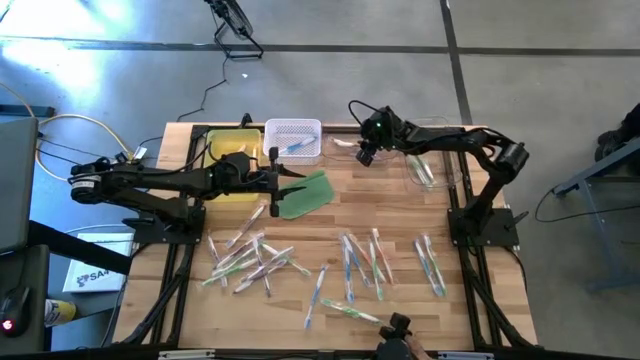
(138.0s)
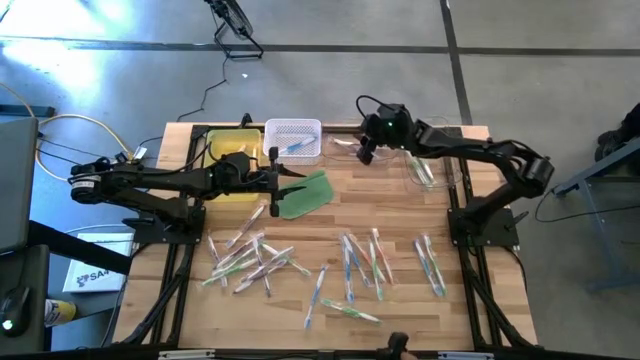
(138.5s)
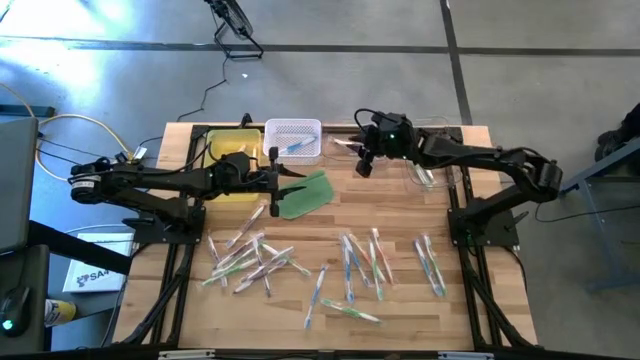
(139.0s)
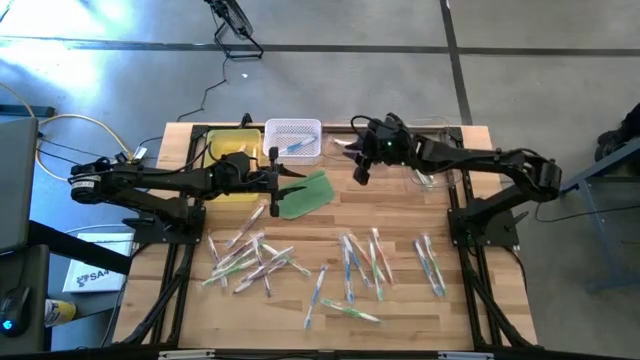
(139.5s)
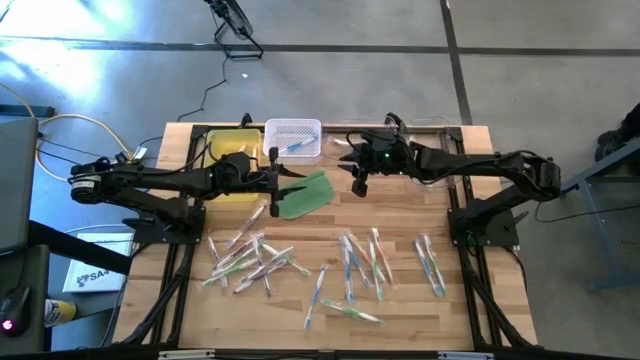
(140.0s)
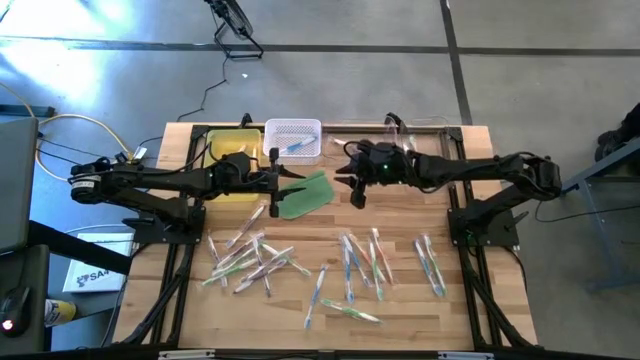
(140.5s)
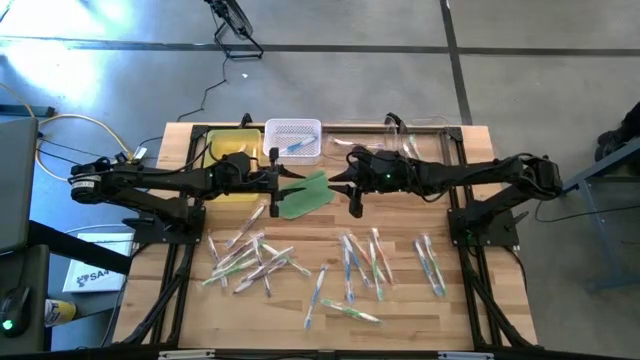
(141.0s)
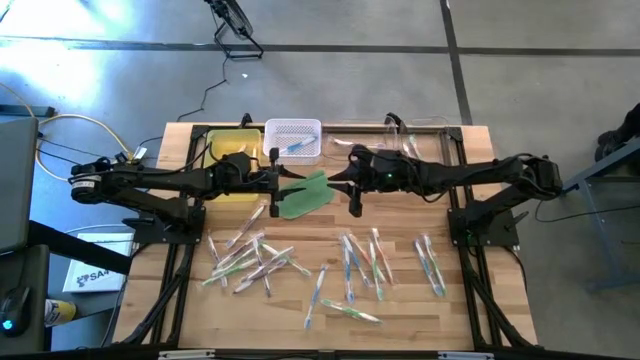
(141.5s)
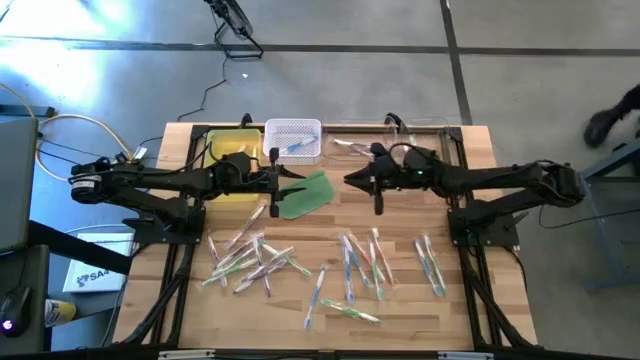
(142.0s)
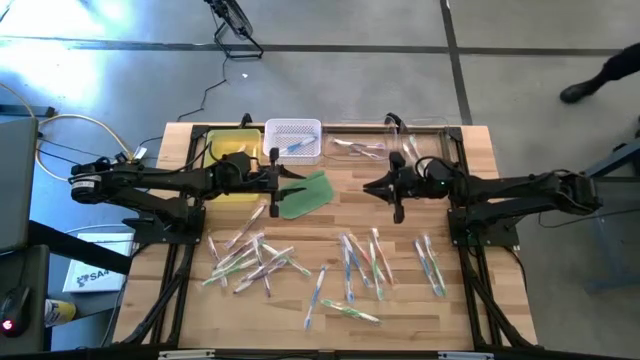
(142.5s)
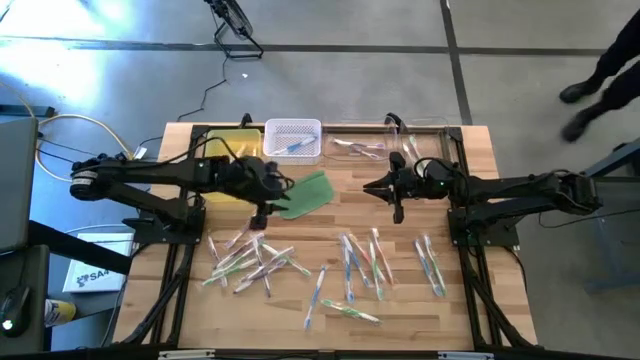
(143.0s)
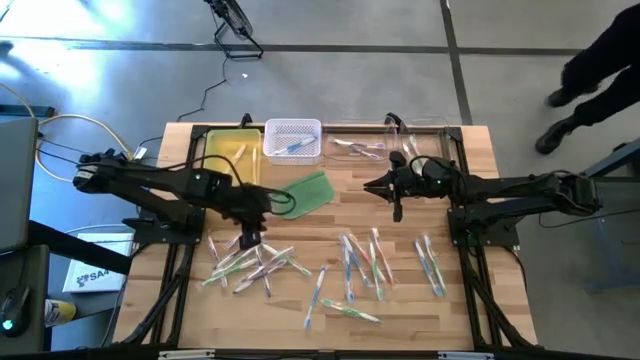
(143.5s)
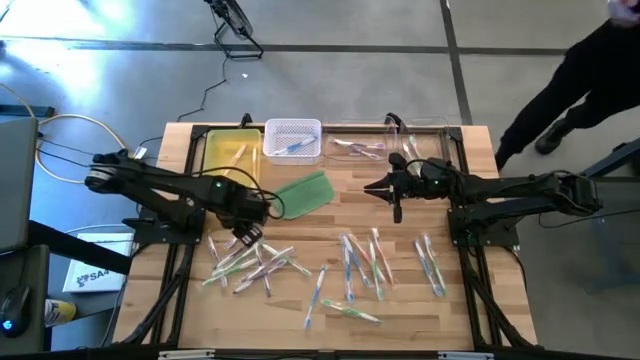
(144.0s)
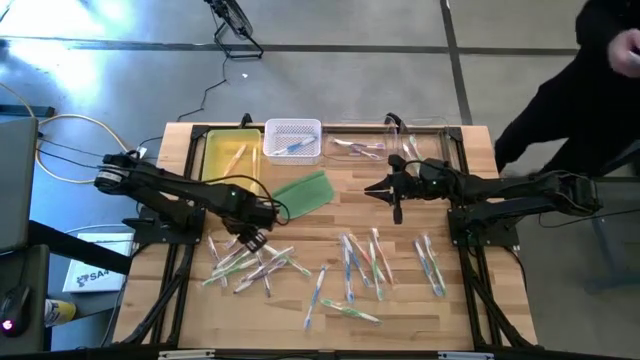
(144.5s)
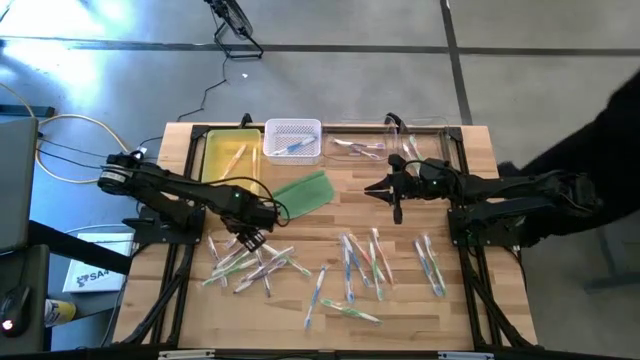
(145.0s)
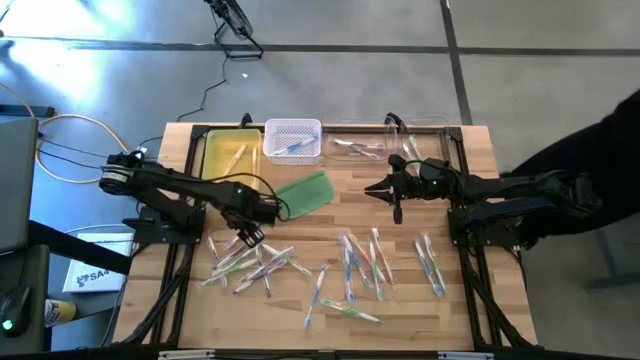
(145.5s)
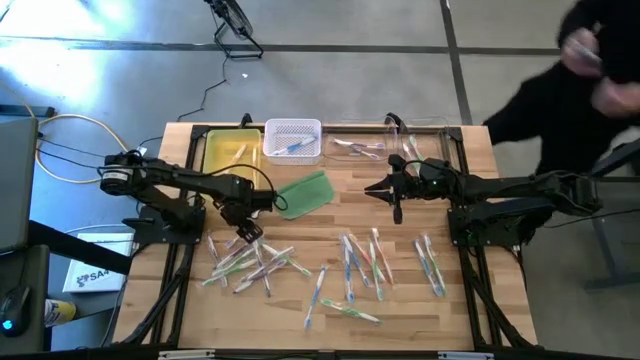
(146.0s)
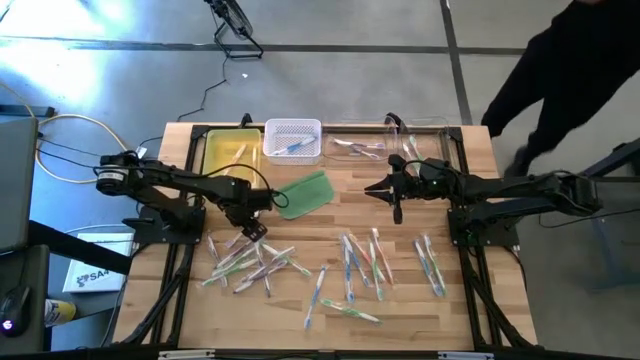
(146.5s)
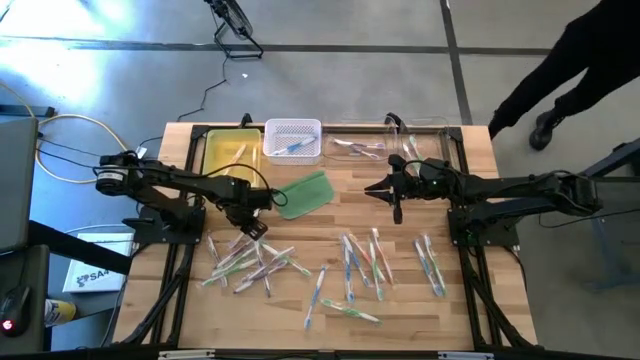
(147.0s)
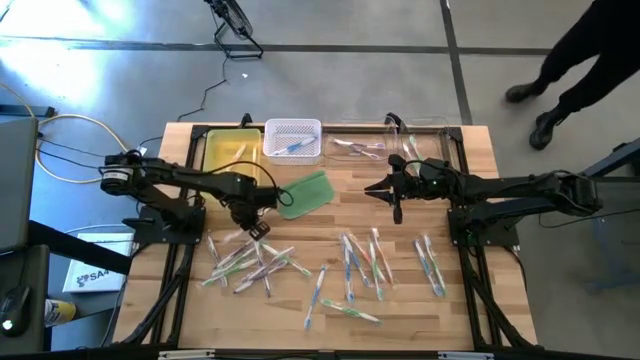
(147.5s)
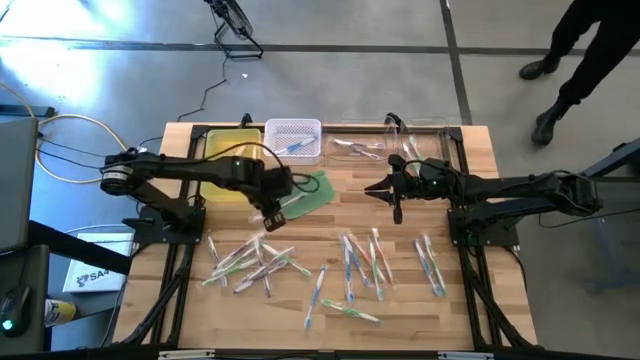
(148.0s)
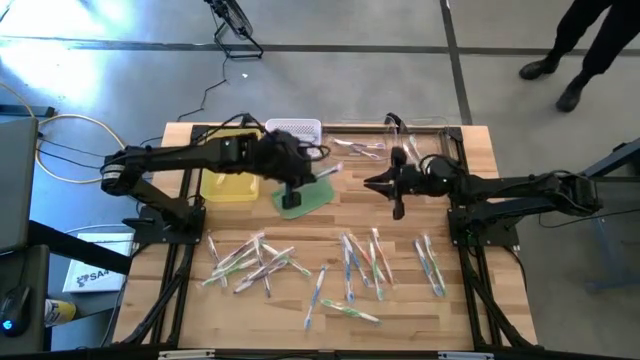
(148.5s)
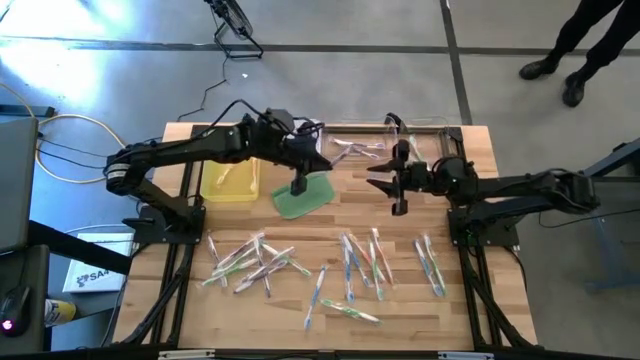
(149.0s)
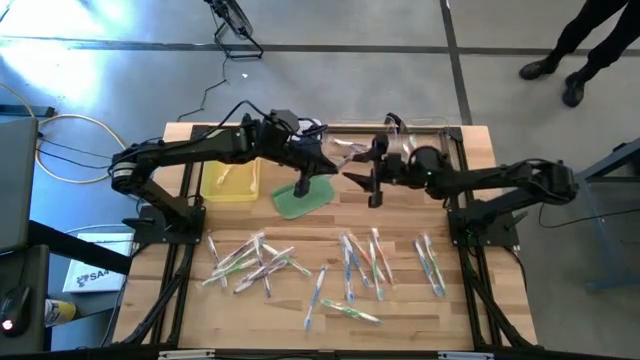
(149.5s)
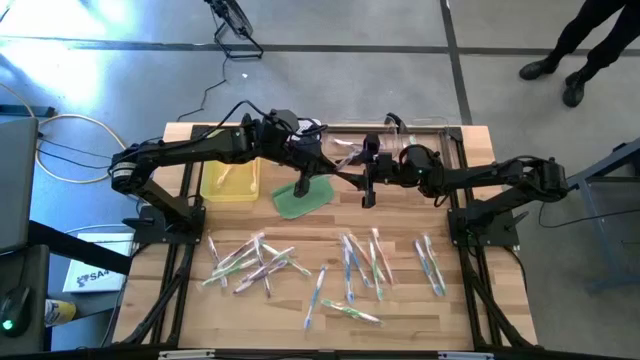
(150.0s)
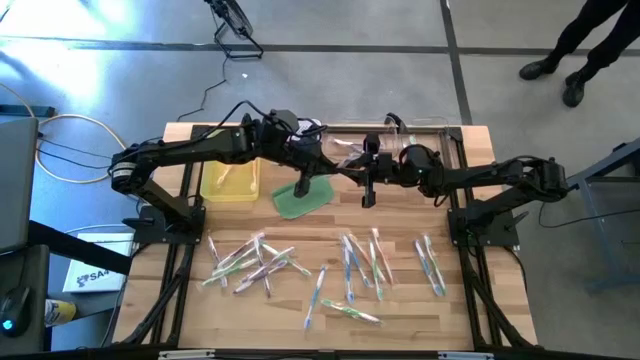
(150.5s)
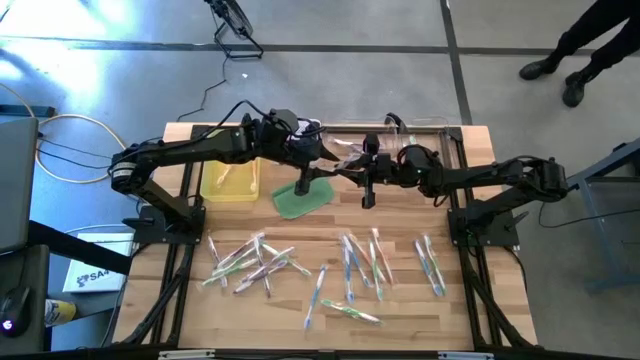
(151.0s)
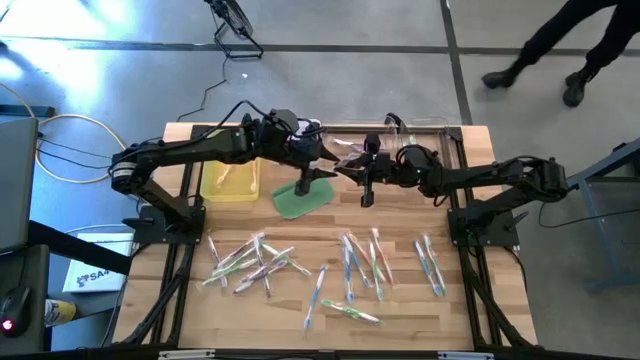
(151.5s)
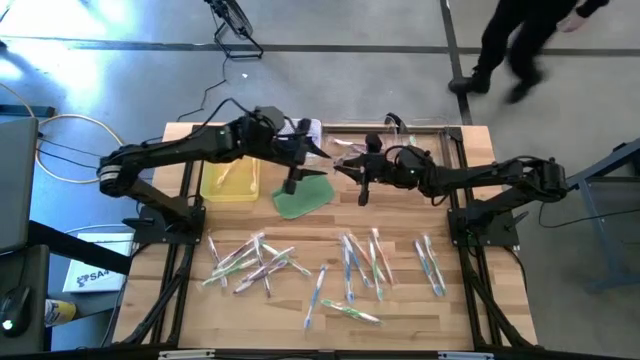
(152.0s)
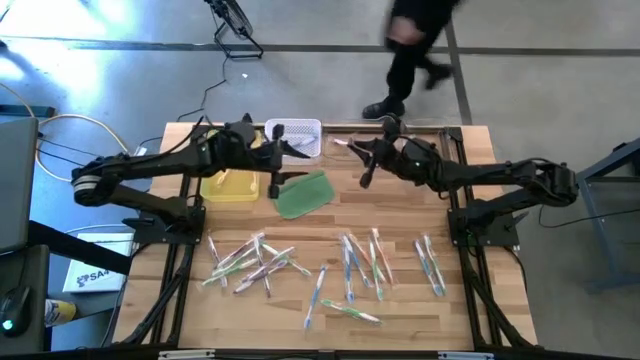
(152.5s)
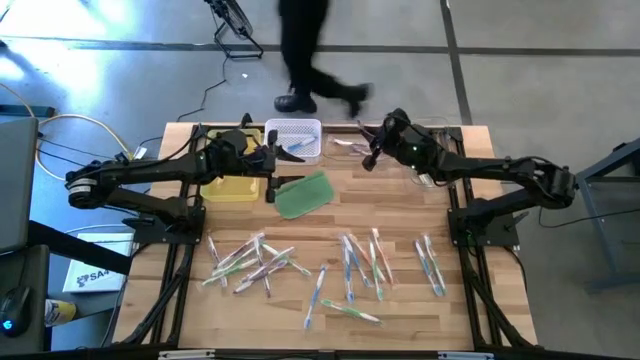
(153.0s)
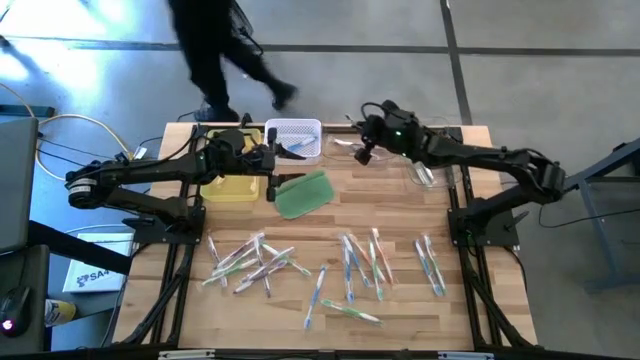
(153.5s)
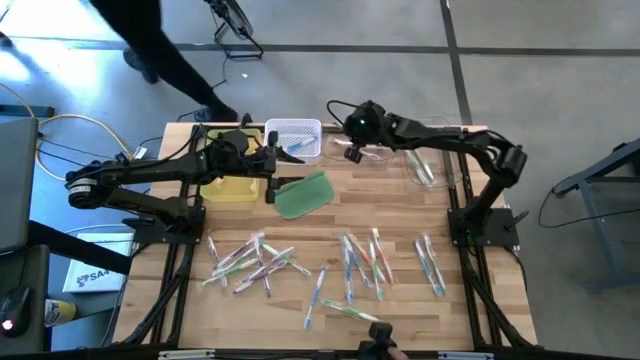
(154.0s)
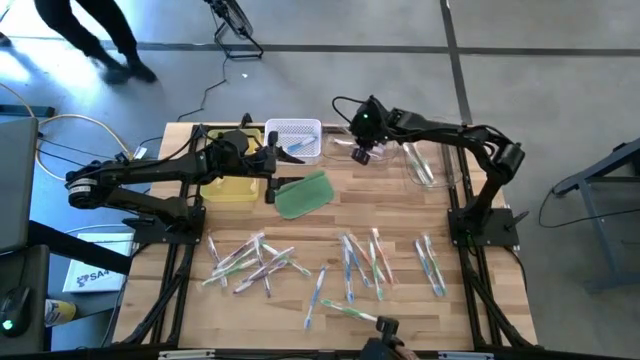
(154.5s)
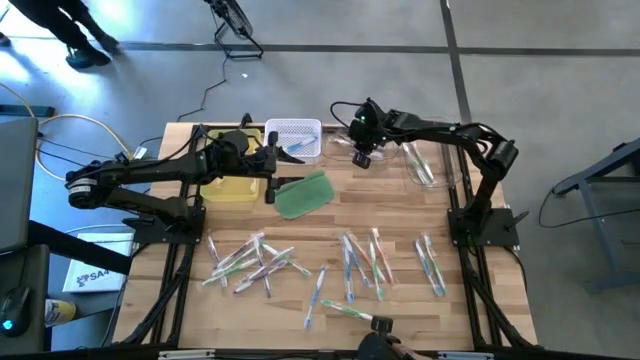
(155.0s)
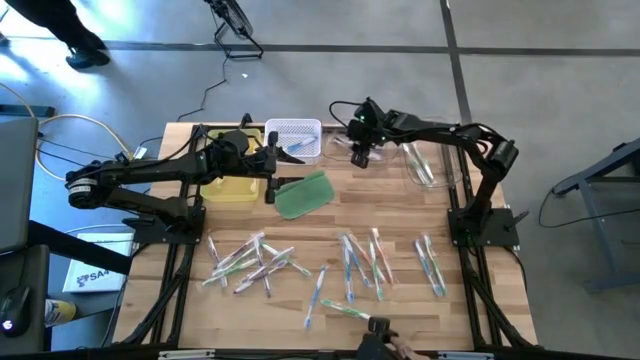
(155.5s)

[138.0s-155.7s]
Task: Pick & Place Toothbrushes
Put the violet toothbrush into the left transparent bin

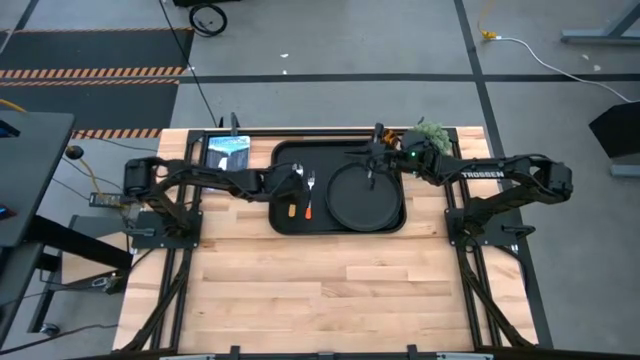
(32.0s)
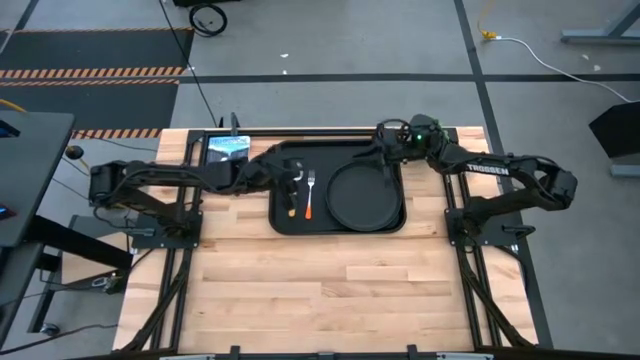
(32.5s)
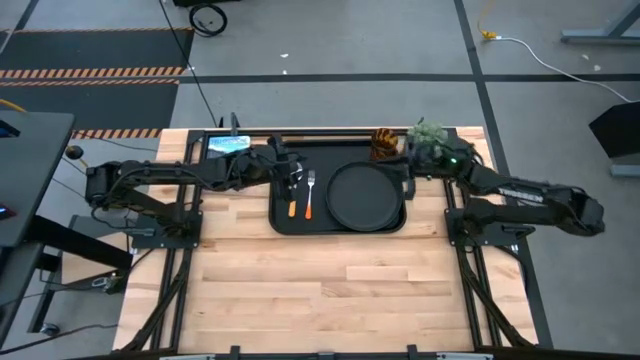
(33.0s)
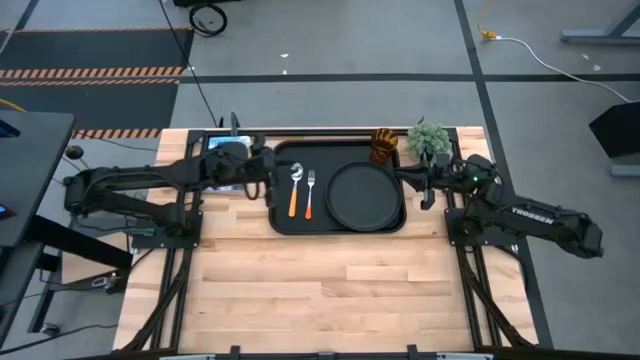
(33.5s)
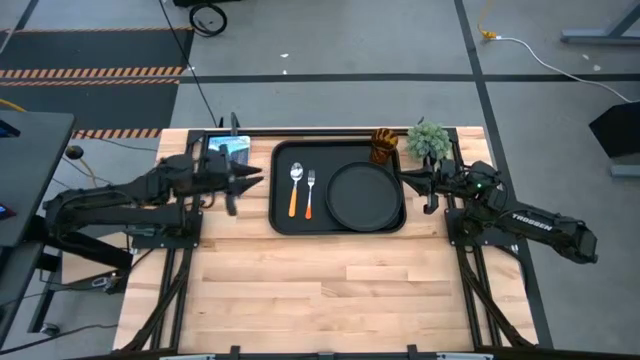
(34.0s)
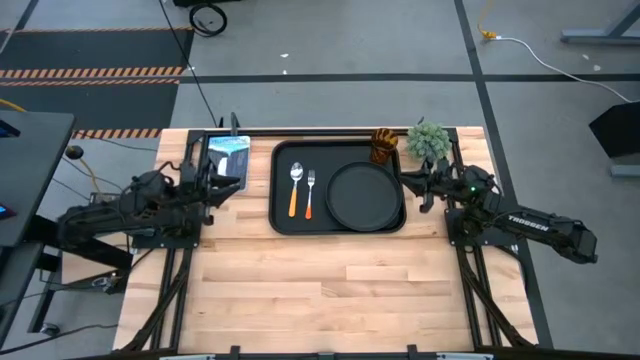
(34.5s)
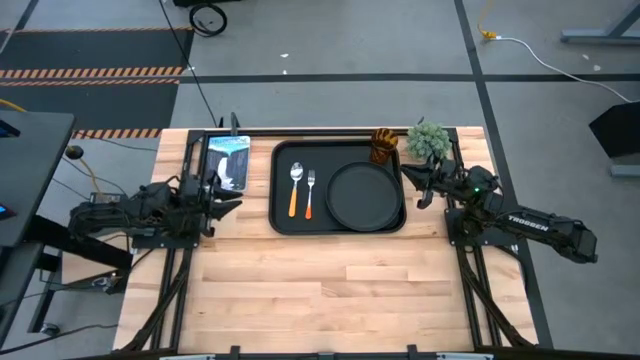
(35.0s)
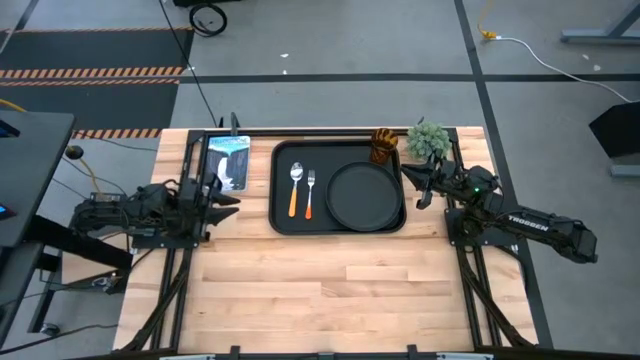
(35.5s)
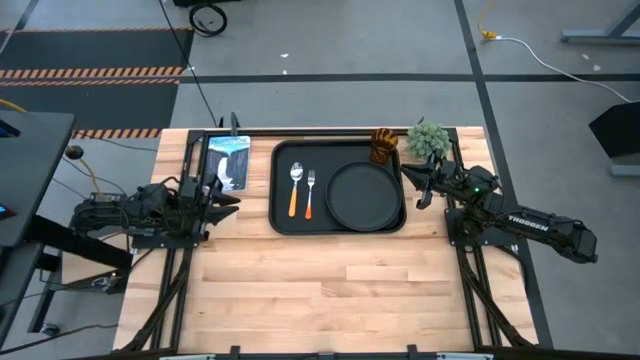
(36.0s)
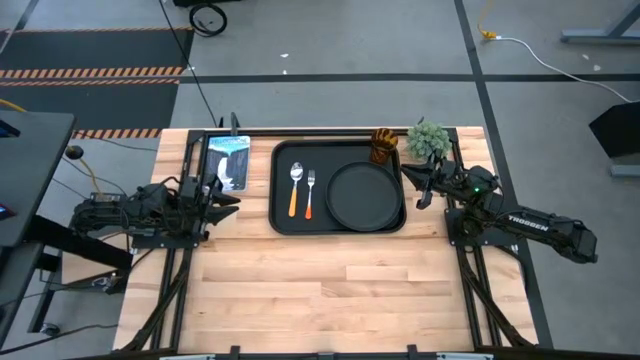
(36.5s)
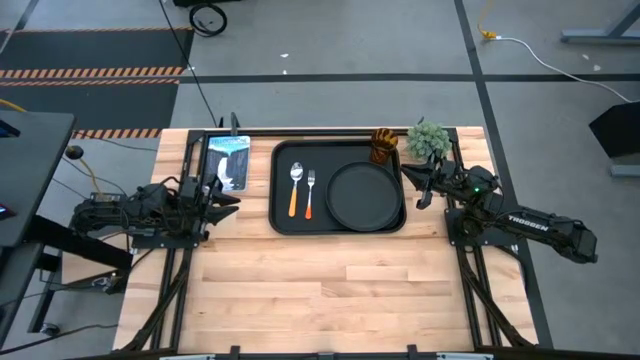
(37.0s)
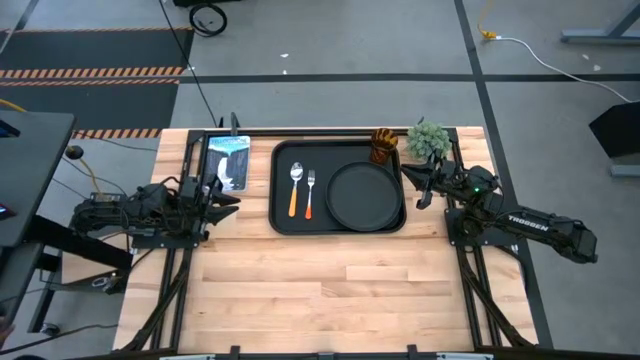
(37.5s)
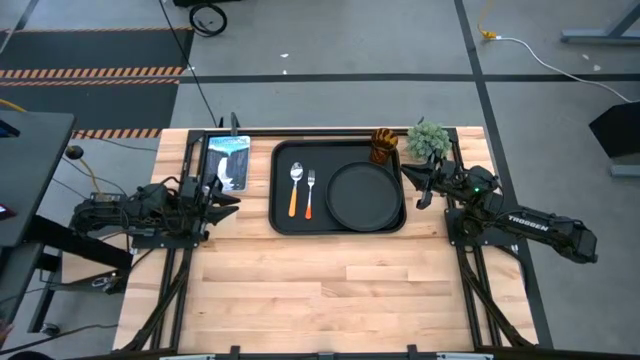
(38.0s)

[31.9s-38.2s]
Task: Pick and place plate/cup/fork/spoon on tray
Return to Home Position
